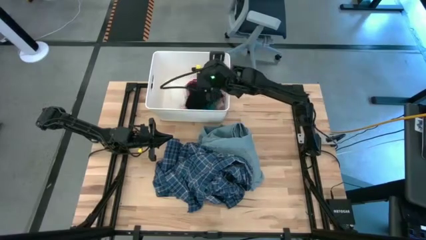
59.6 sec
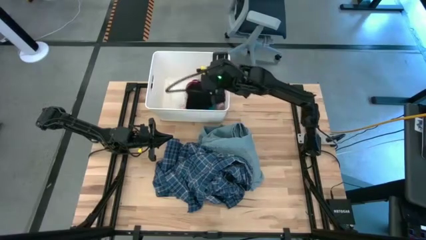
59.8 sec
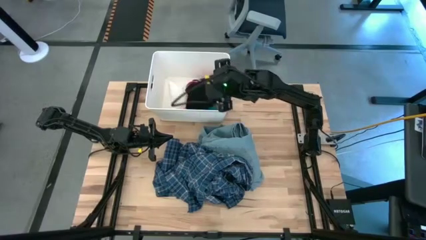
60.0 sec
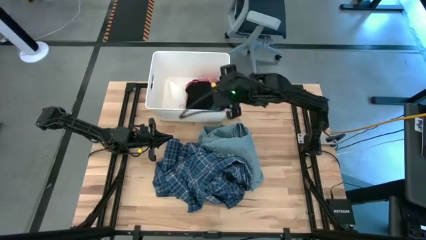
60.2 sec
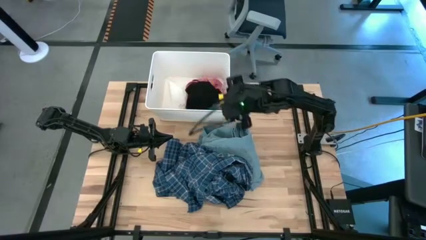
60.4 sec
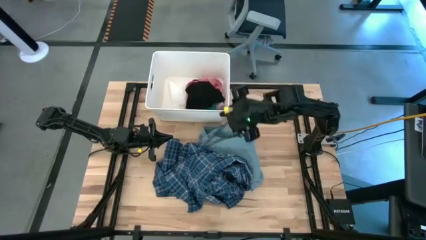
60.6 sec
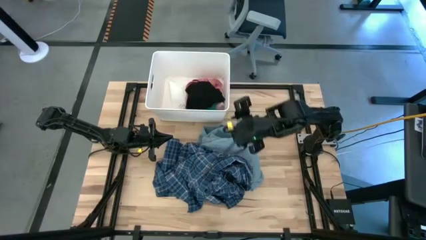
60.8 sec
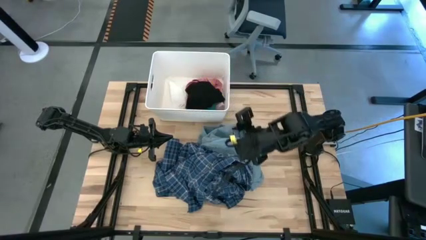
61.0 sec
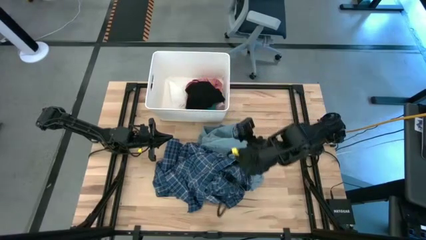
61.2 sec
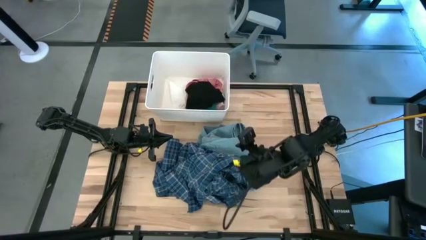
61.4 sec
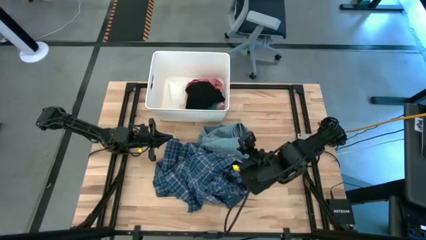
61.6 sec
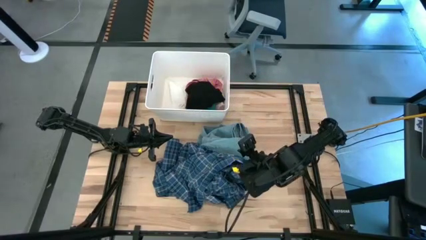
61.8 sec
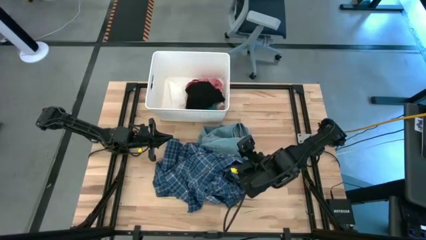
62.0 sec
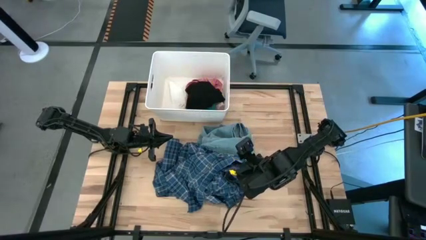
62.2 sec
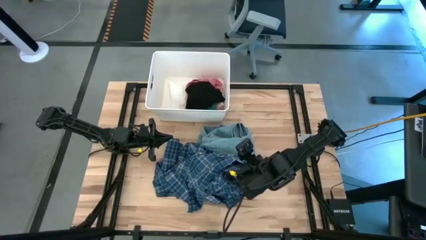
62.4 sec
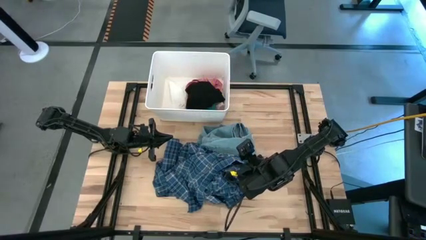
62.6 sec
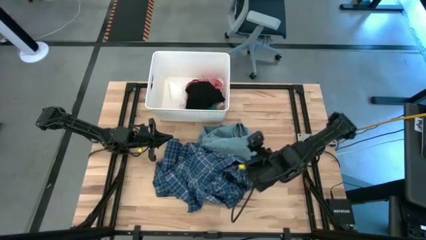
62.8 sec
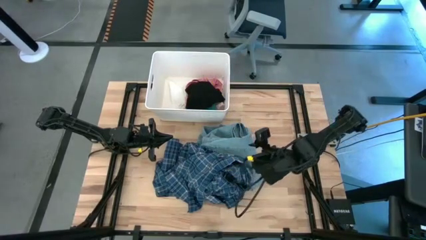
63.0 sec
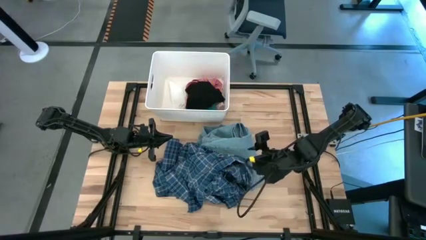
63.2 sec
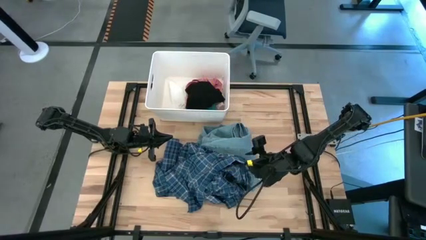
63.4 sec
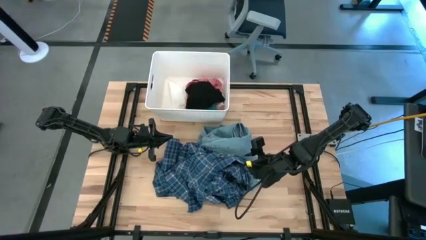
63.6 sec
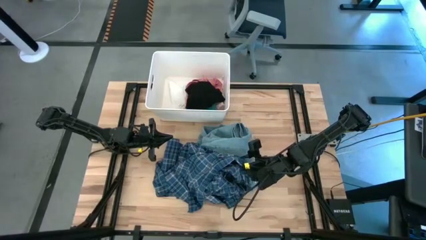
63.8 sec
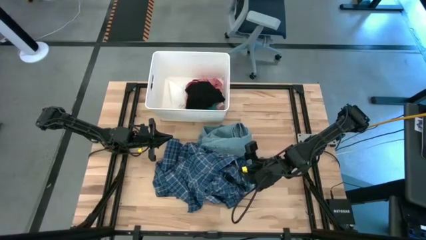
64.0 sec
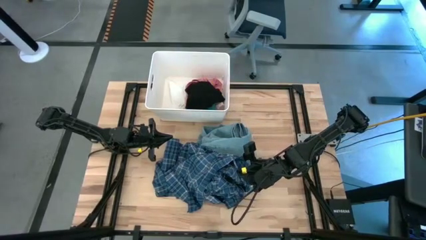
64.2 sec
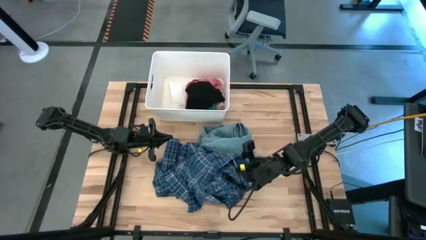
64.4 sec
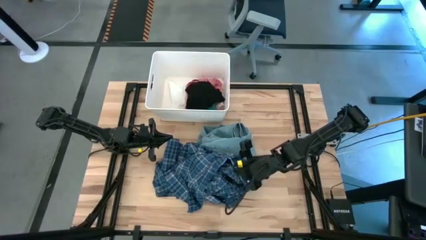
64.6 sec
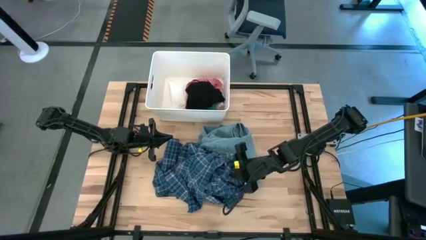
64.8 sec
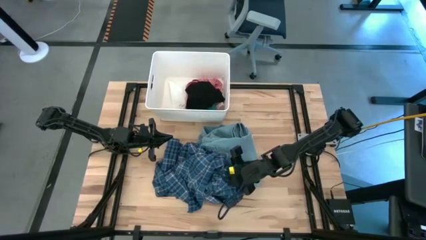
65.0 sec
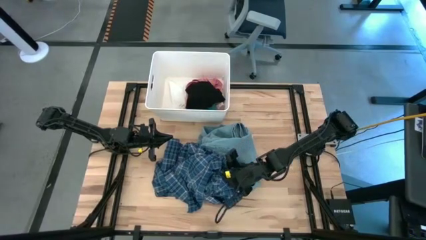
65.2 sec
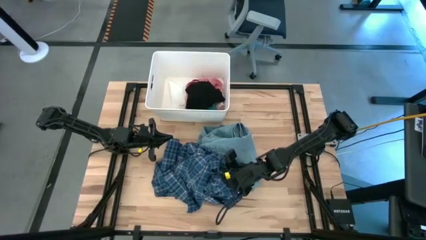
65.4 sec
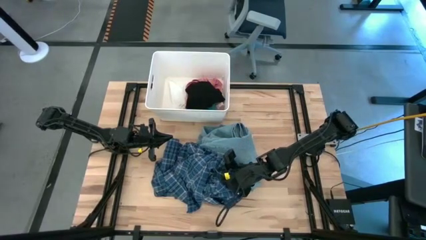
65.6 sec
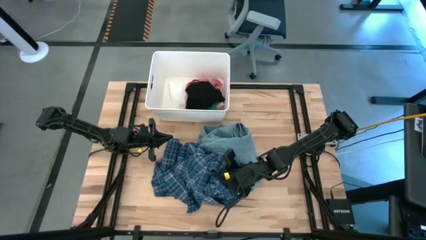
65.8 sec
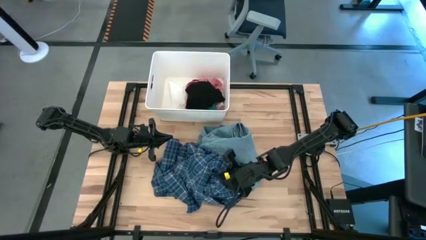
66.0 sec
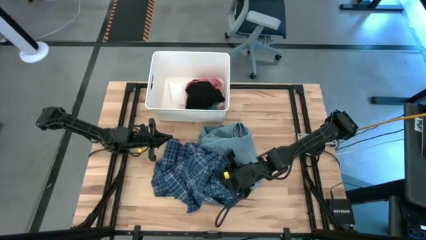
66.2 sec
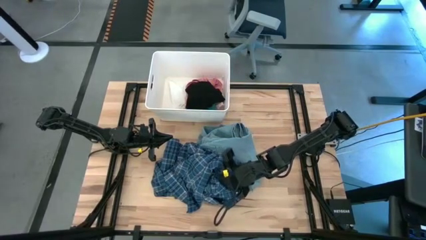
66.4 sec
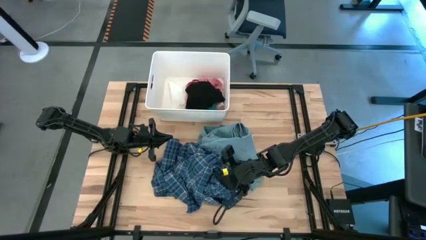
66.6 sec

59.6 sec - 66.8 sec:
Task: Sort clothes
Put the blue checkered shirt into the white bin

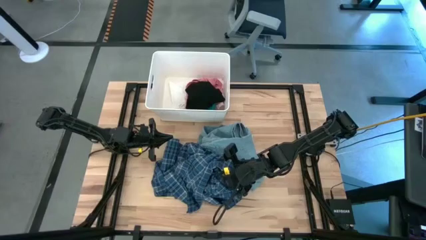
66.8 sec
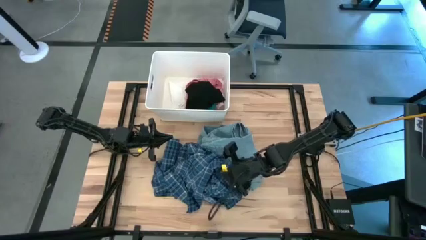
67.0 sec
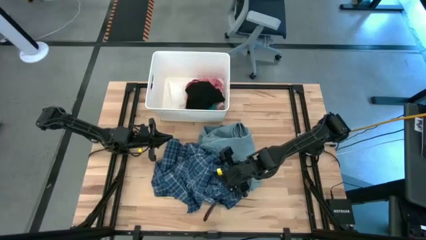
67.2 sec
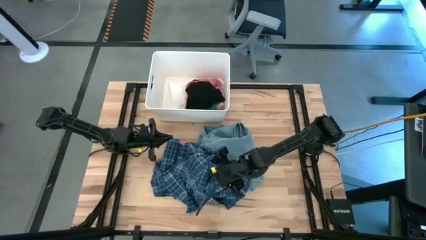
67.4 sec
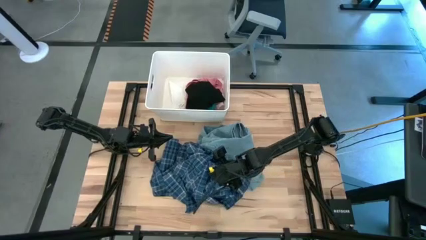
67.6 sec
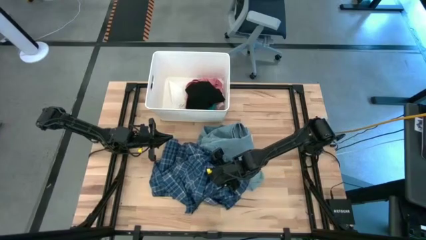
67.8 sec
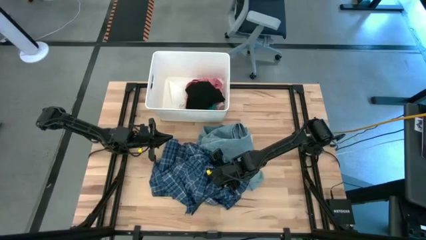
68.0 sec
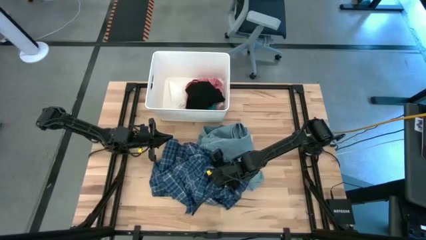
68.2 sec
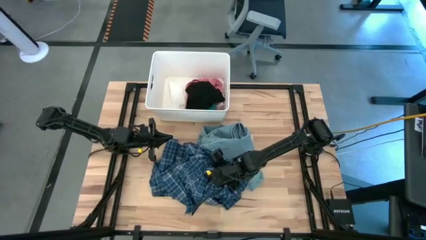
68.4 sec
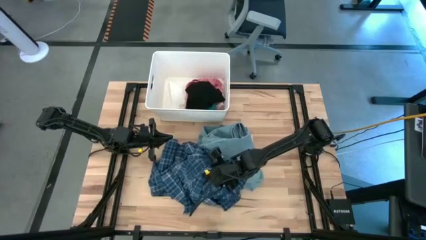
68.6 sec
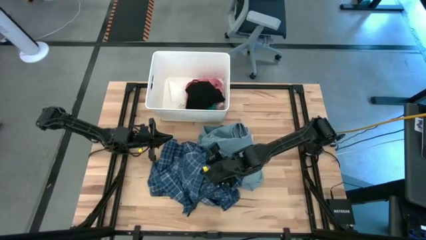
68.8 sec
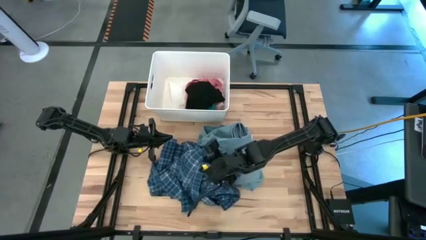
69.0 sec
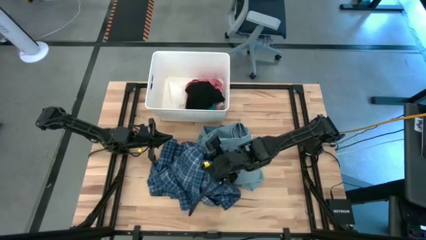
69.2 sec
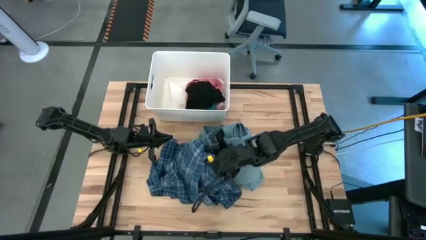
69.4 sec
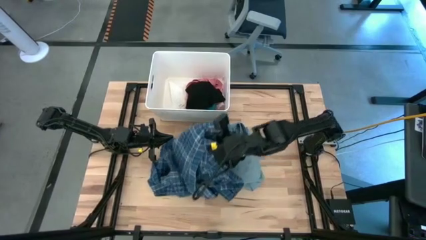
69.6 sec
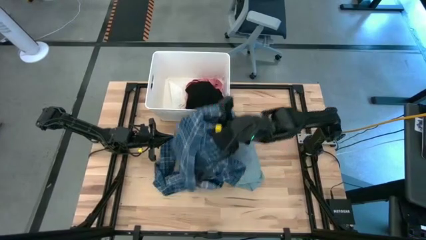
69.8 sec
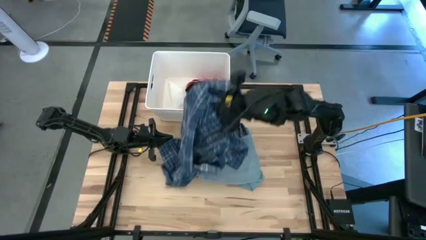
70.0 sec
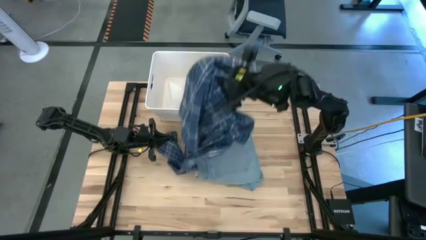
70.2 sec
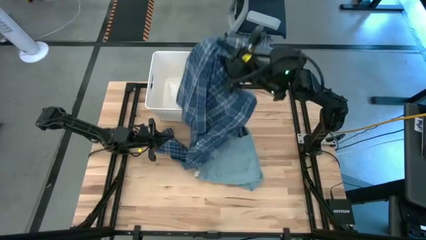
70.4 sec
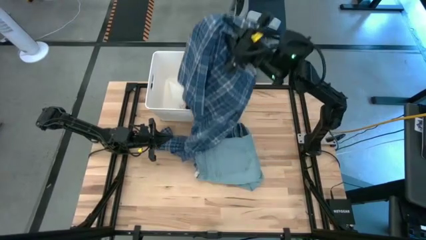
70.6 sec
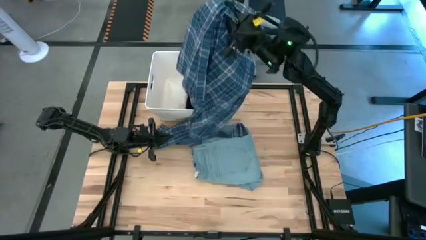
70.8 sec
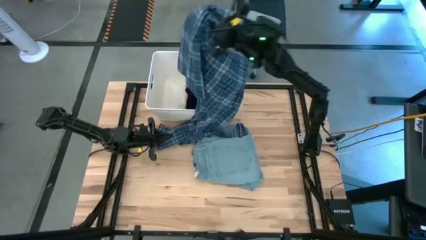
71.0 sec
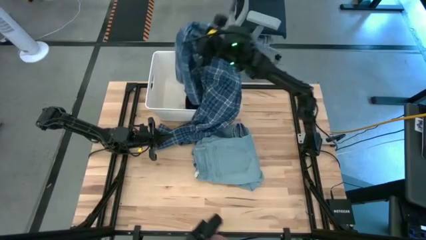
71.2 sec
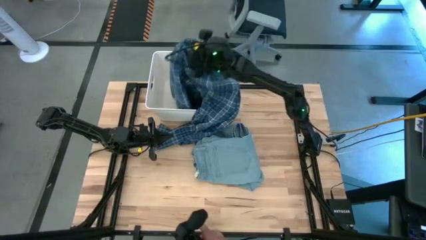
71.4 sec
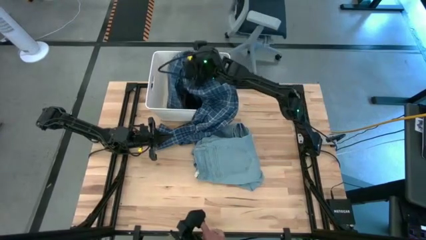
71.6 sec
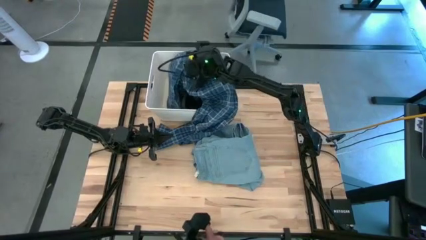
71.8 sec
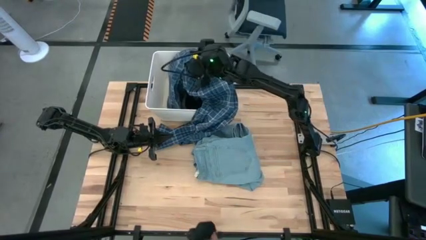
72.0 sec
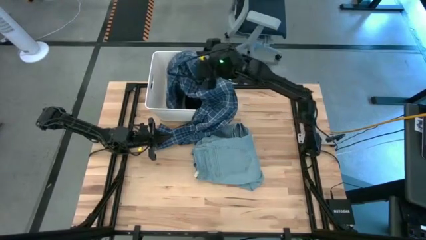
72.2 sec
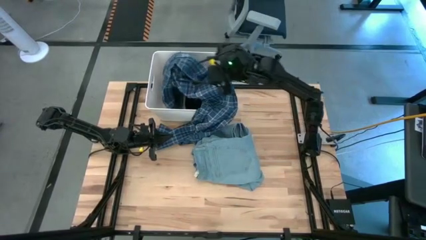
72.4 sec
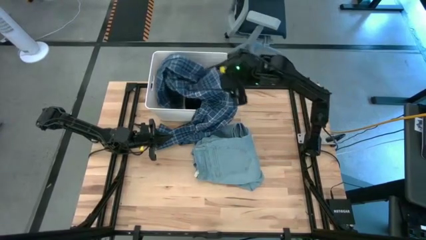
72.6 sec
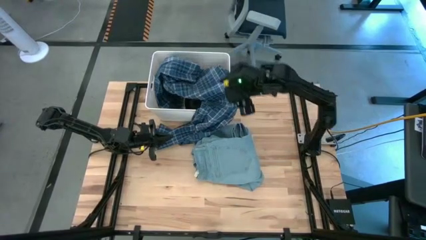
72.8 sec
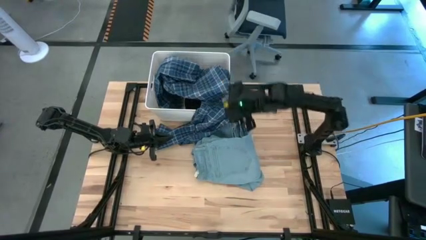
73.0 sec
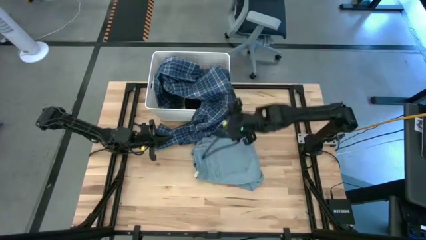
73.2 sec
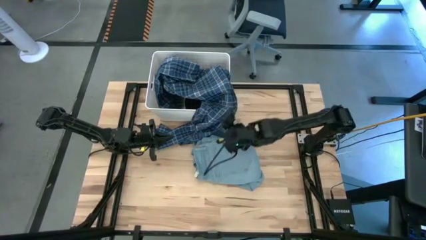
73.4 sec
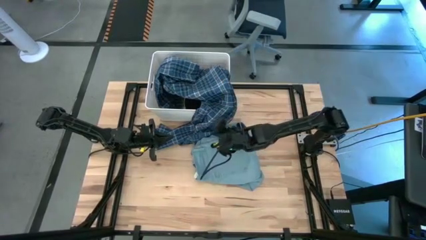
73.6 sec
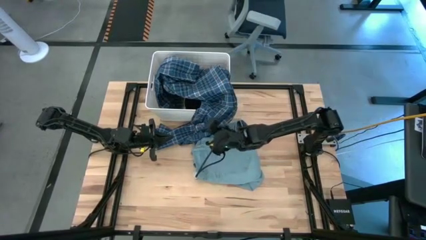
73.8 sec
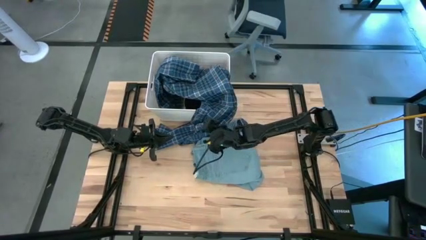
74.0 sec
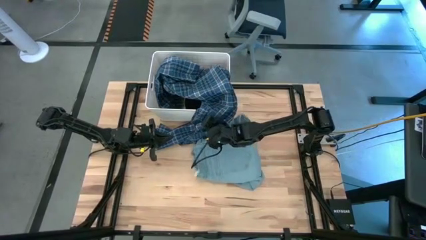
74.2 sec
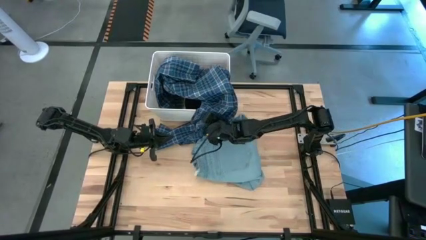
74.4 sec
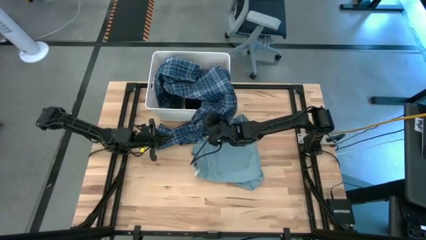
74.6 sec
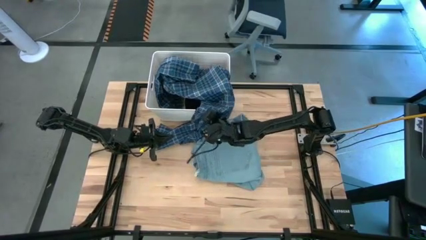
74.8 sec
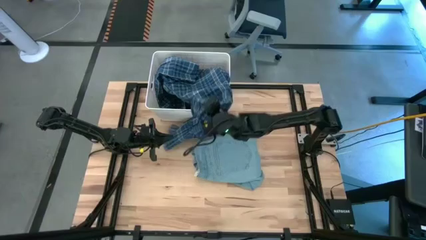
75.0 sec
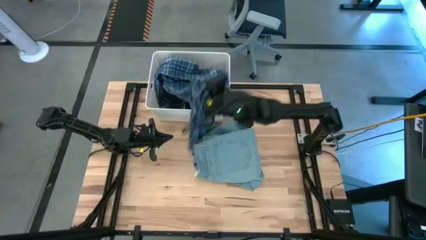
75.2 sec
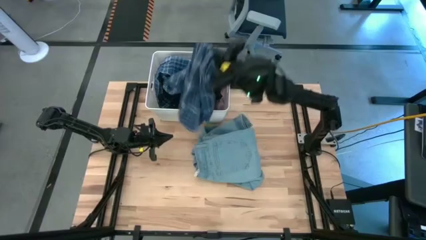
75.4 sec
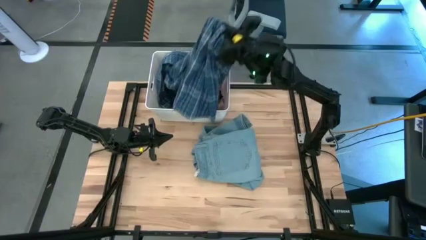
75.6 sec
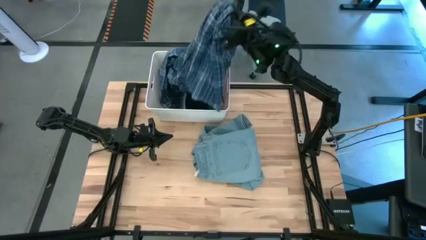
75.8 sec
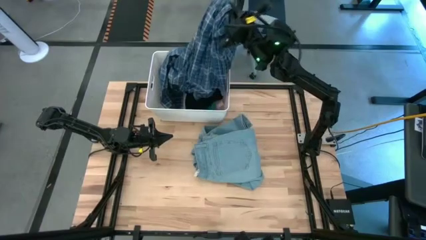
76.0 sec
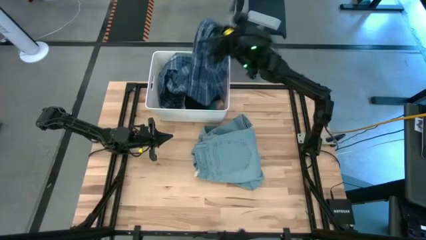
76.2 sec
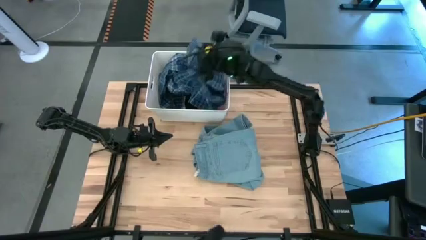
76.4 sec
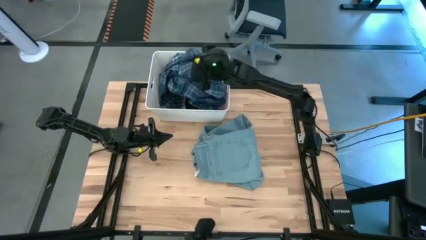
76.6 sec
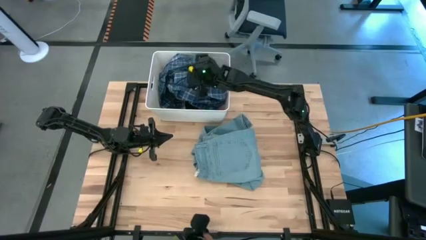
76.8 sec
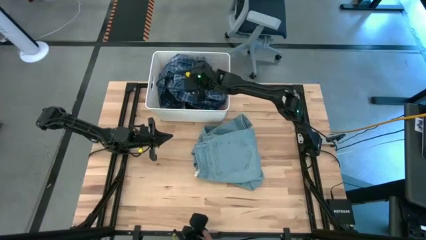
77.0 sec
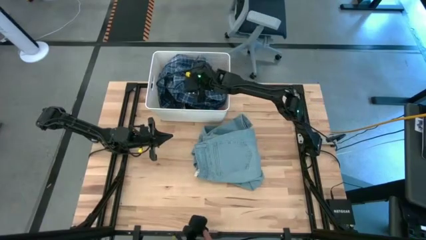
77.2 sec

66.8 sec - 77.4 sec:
Put the blue checkered shirt into the white bin
